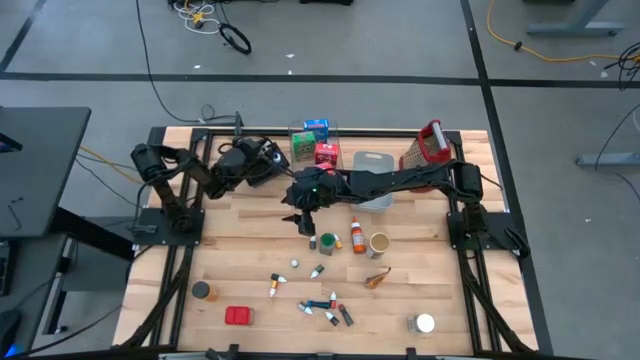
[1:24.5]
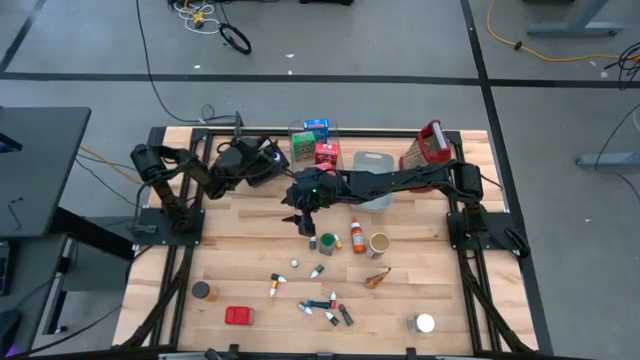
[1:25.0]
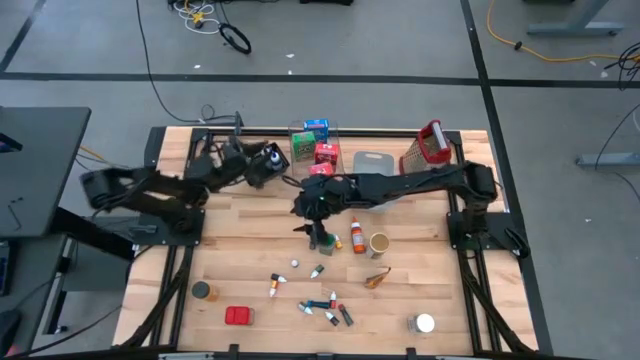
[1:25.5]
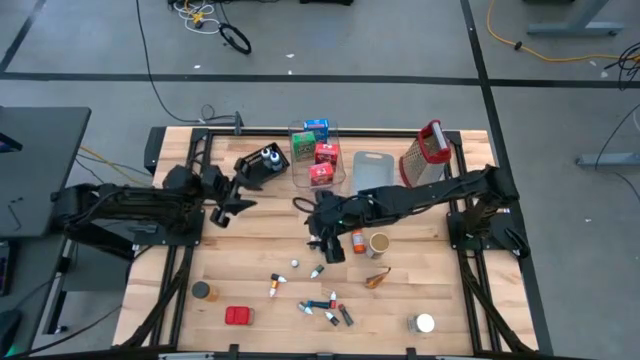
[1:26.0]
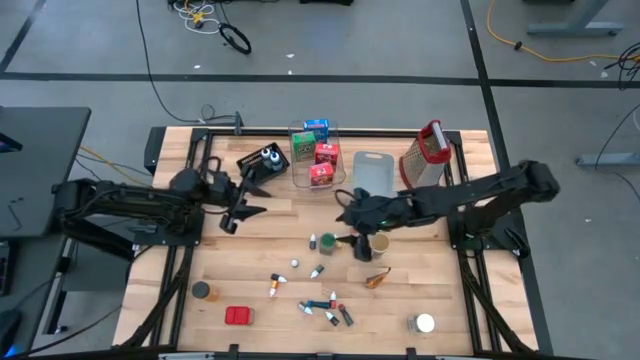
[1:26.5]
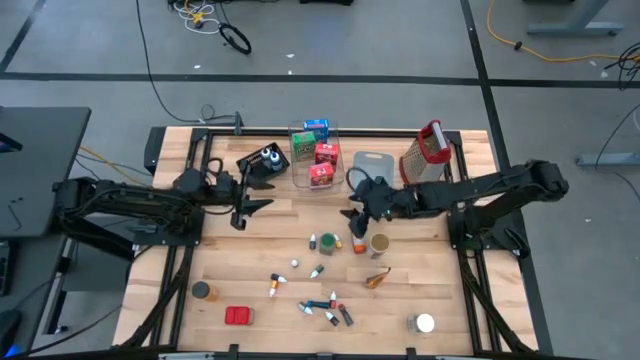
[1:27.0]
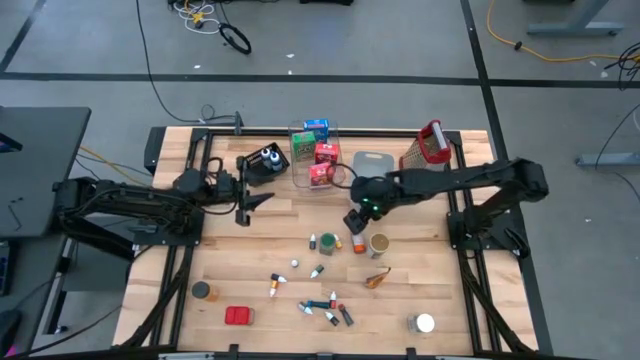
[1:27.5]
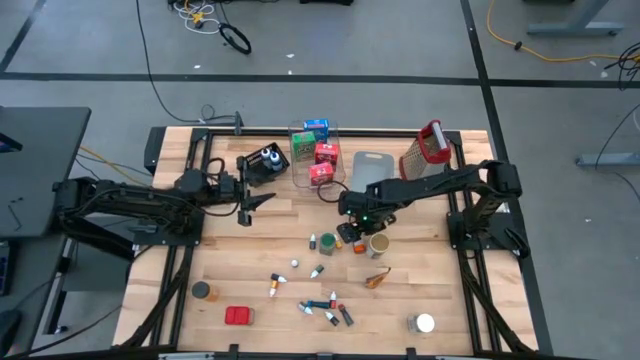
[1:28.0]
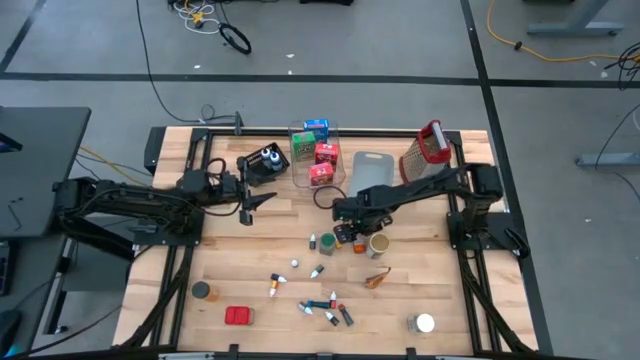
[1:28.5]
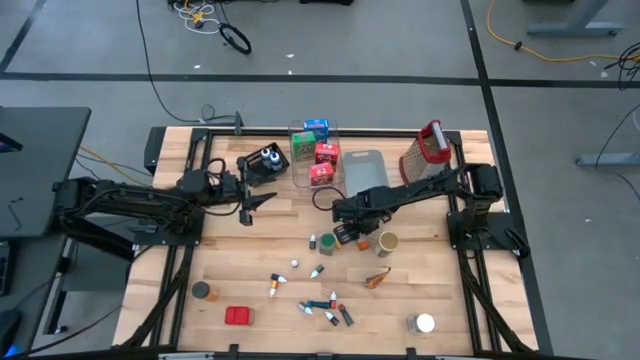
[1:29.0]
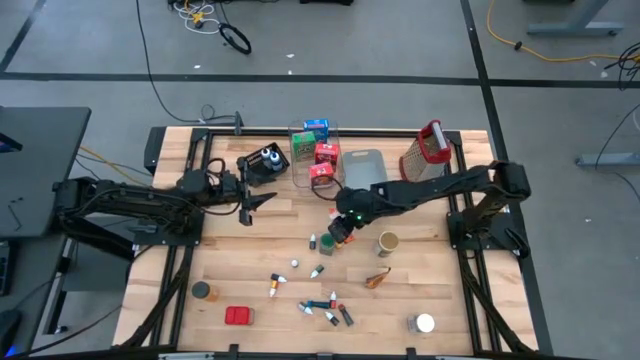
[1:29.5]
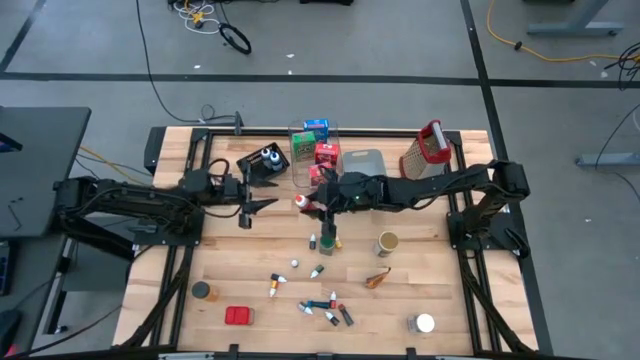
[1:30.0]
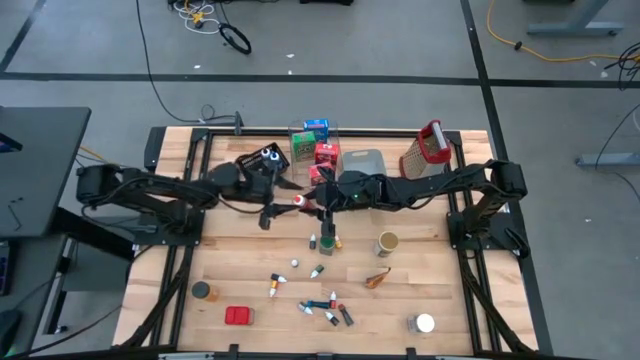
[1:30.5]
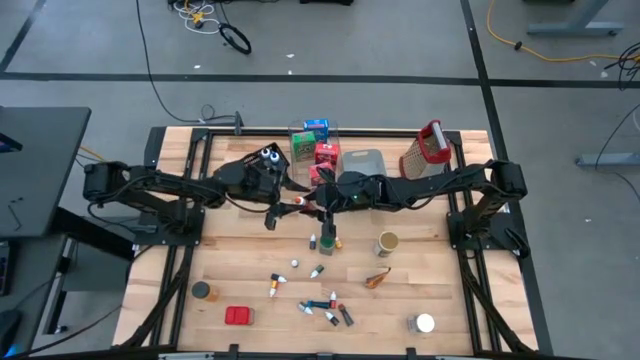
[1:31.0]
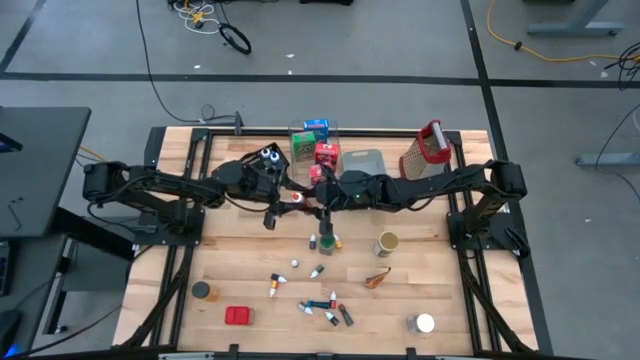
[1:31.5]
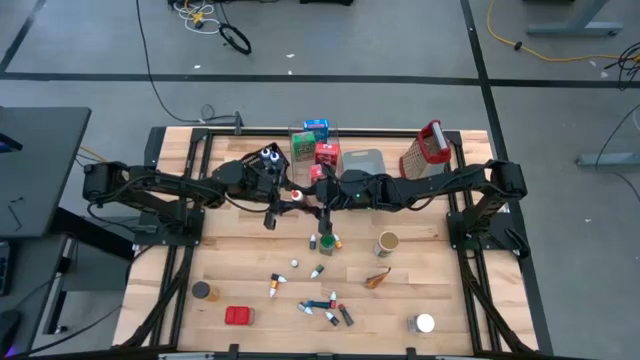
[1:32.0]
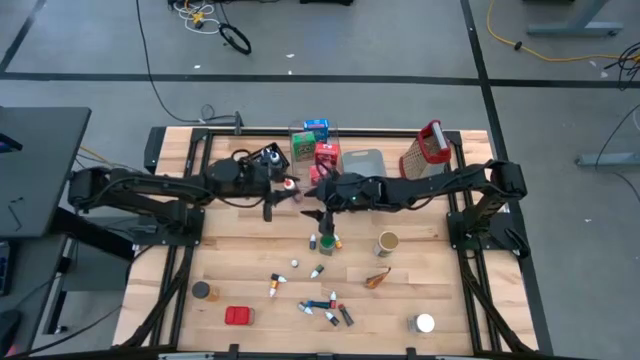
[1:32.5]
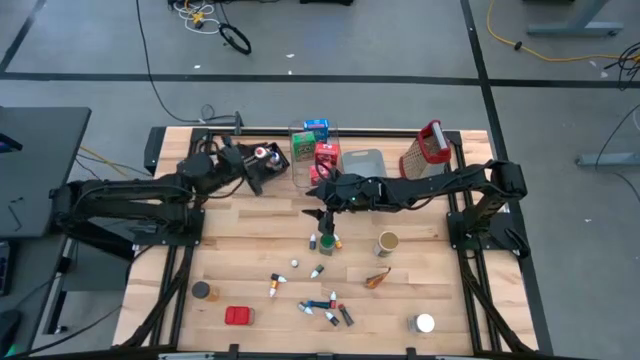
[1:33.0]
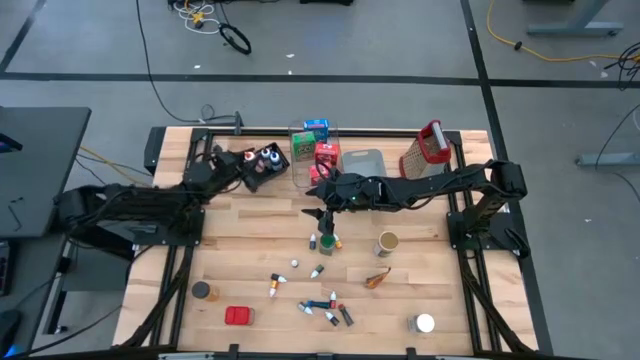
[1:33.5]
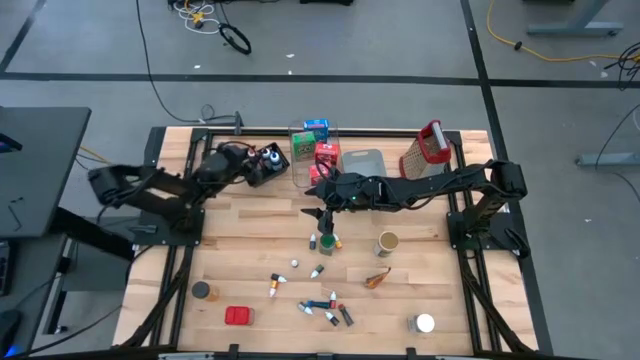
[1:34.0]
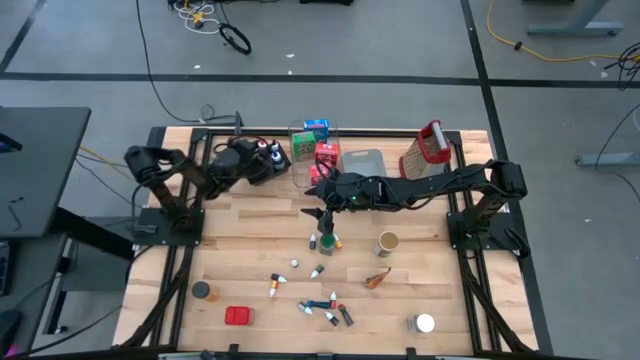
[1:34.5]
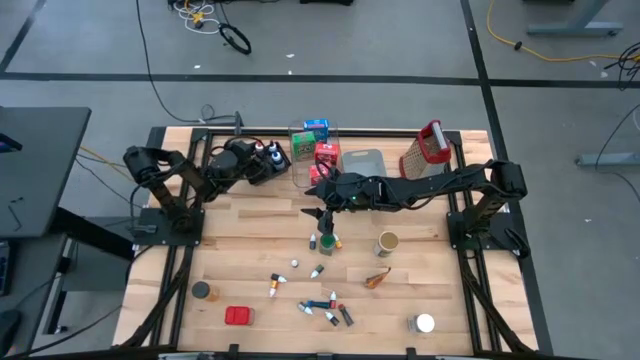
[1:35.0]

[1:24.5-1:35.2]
Task: Pick & Place Kitchen Items
Put the large orange food coloring bottle into the black bin

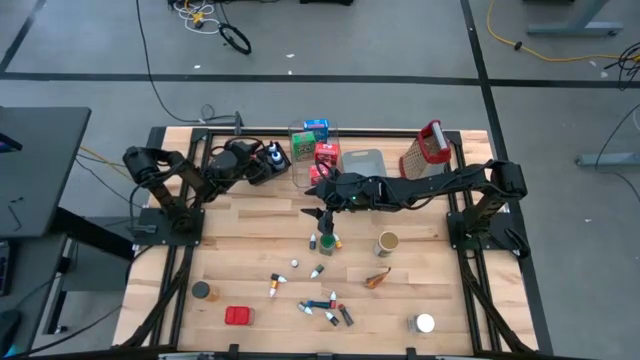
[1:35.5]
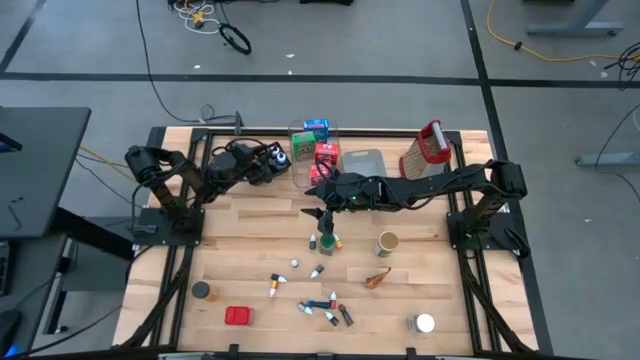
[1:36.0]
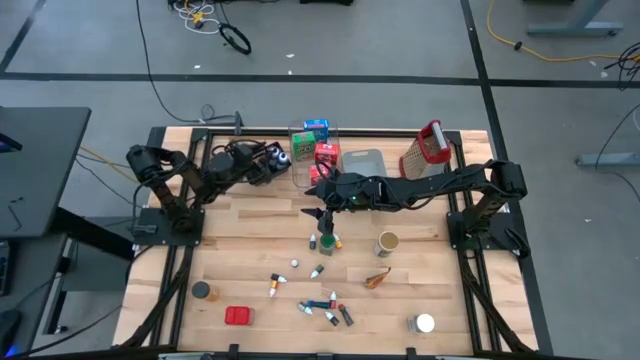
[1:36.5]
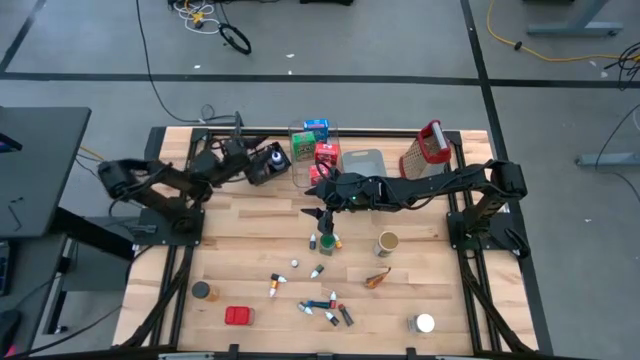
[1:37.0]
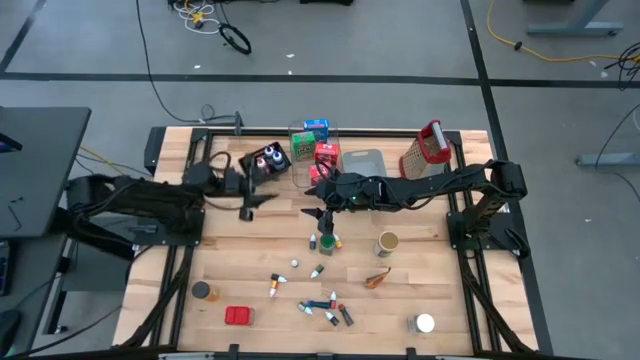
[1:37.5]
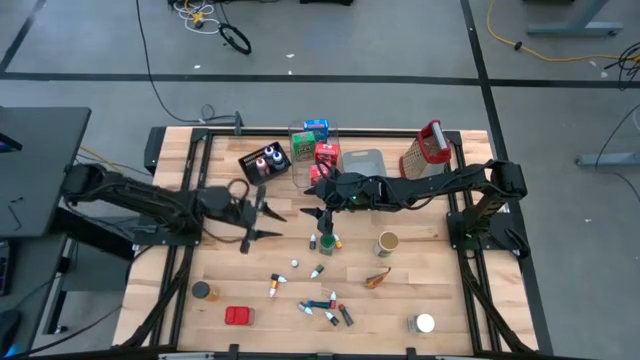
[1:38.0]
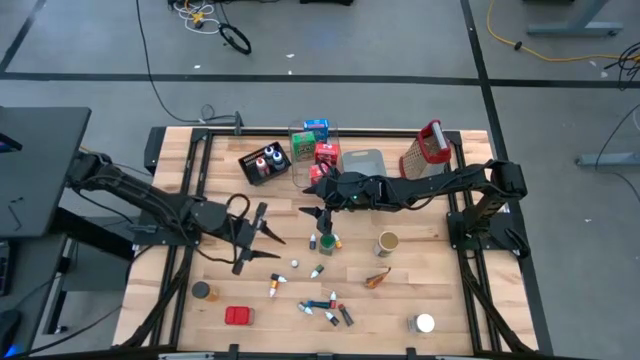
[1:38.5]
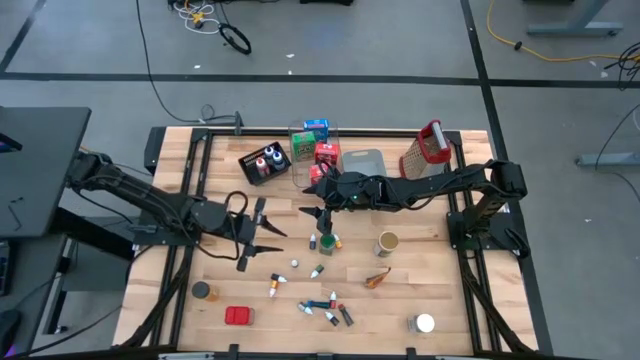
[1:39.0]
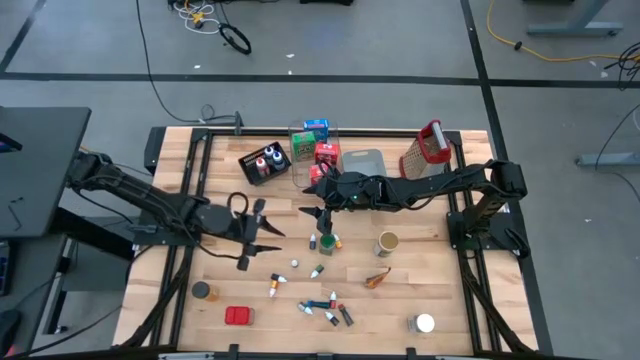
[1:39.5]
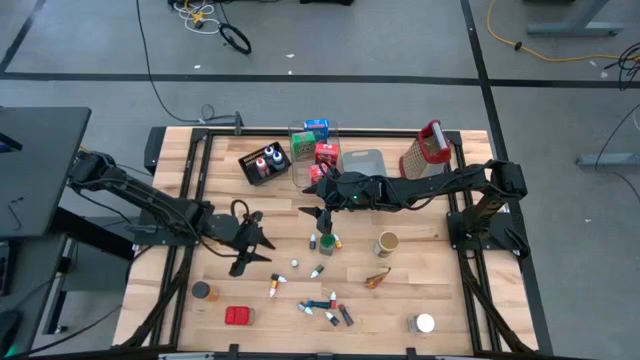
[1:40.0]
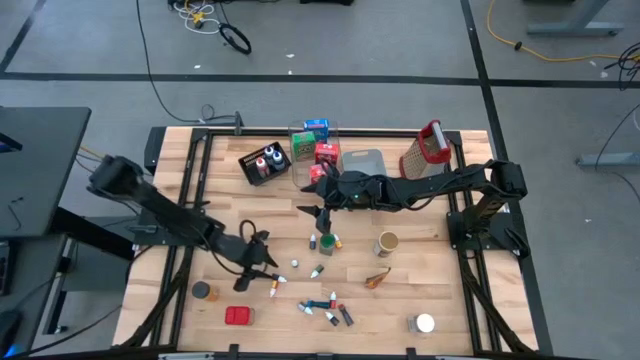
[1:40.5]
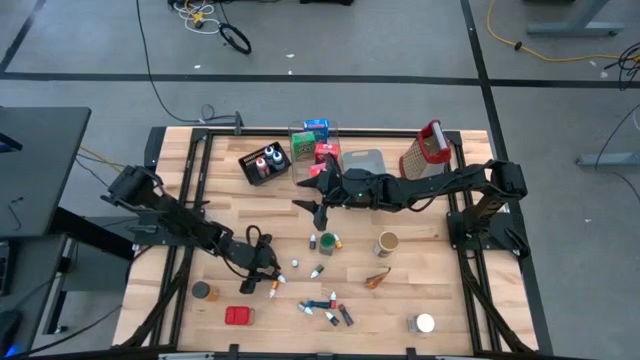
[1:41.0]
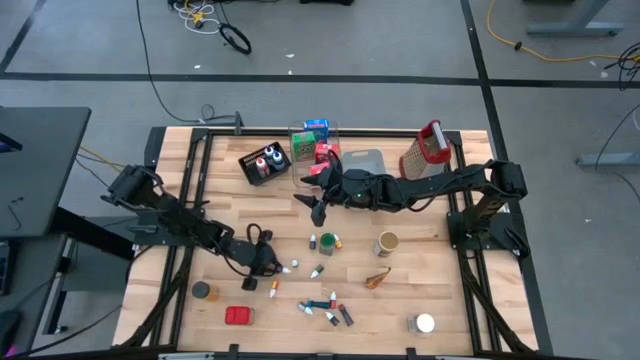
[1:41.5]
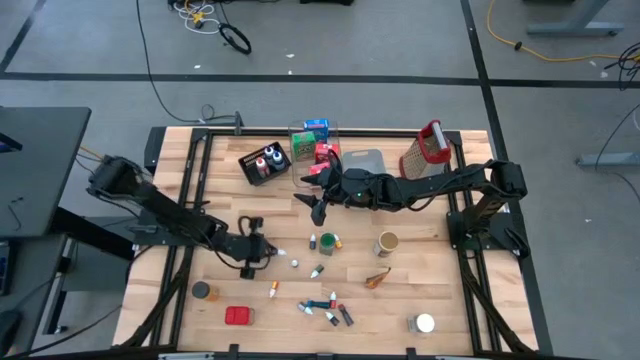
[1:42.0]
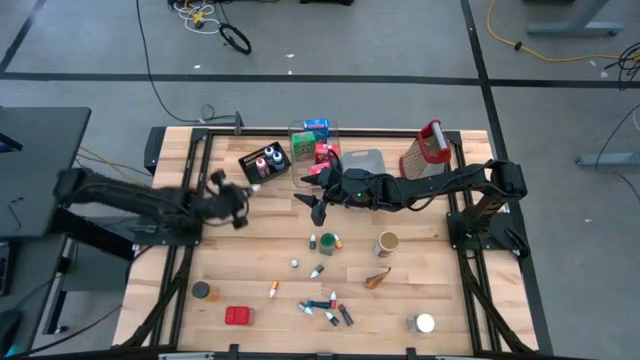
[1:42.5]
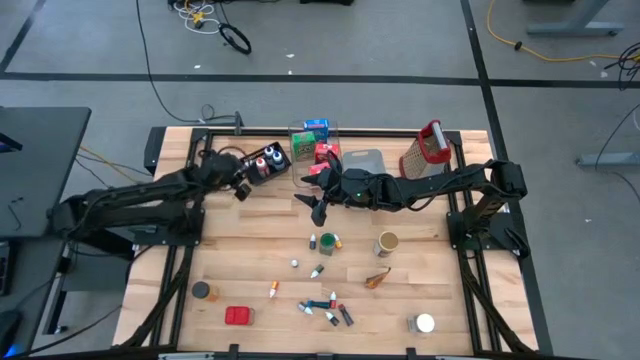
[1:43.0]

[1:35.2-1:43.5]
Put the small purple food coloring bottle into the black bin

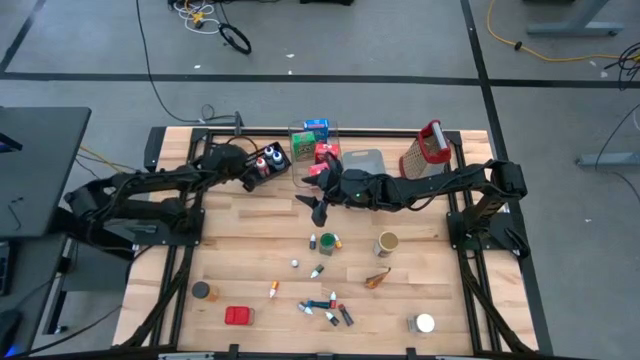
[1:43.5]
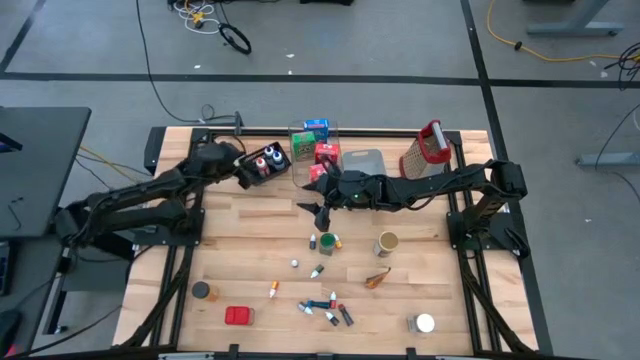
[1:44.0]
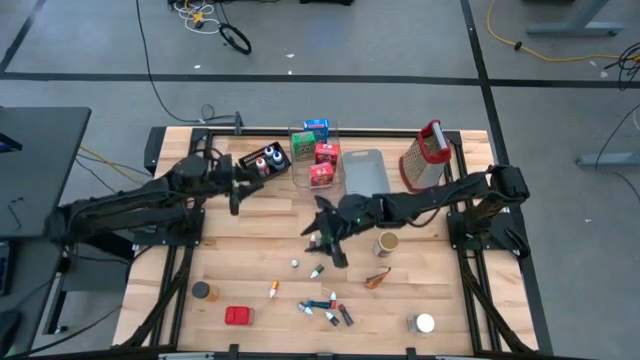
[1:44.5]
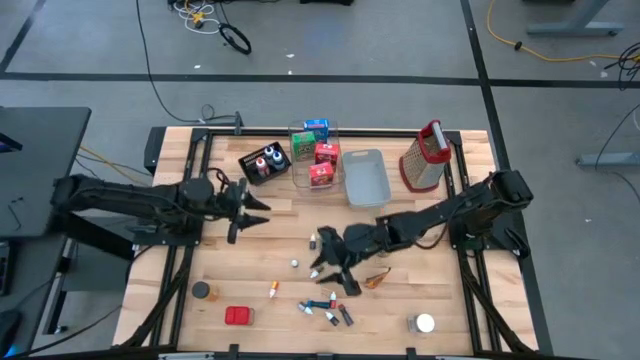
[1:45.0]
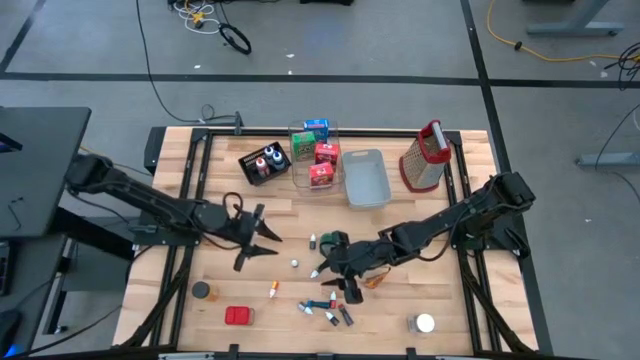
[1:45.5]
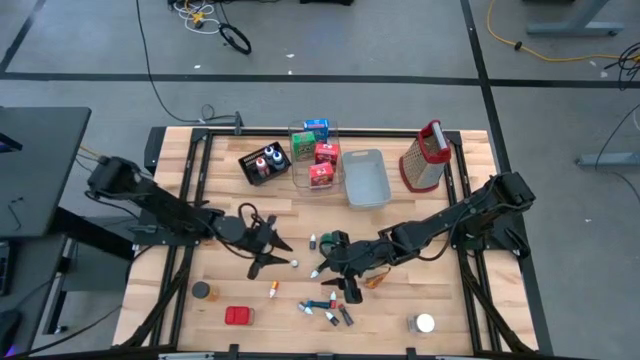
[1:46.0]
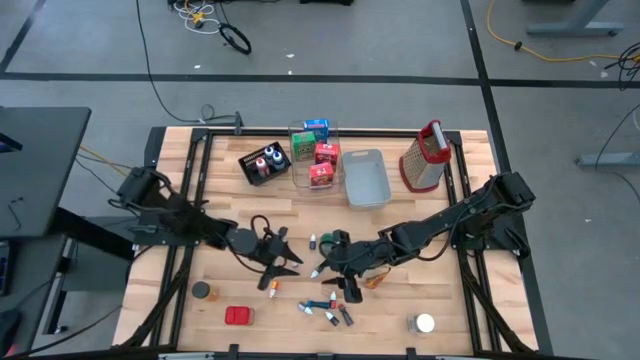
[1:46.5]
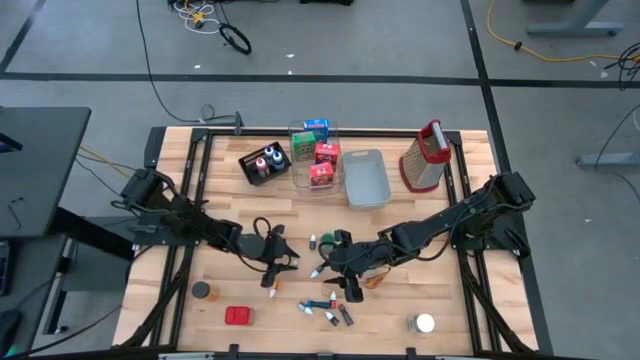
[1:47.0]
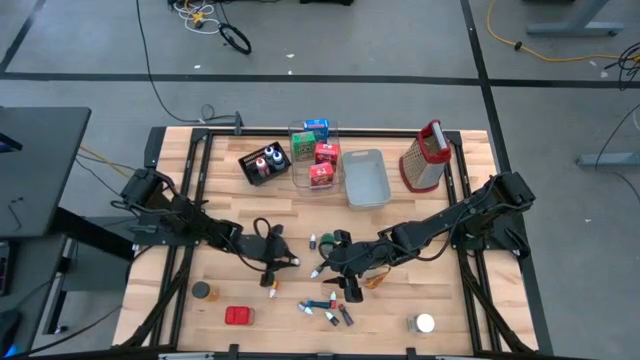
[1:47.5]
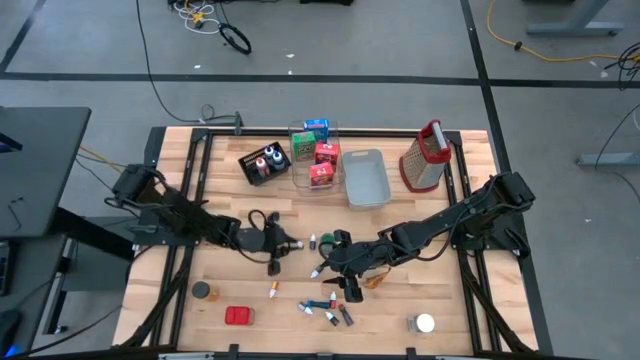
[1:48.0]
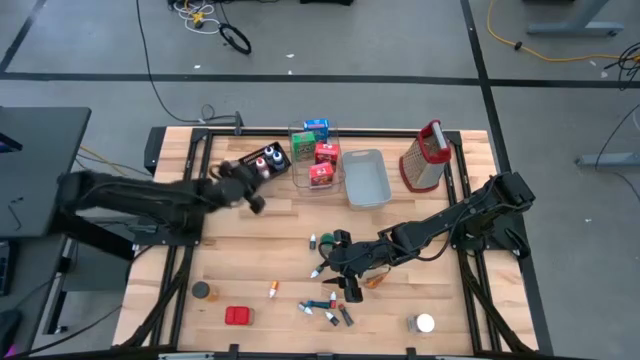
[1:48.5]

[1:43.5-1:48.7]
Put the small black food coloring bottle into the black bin
